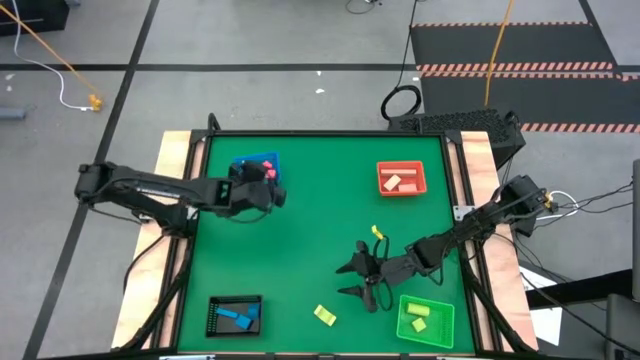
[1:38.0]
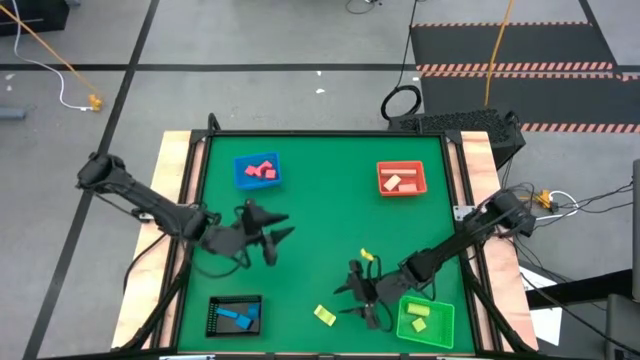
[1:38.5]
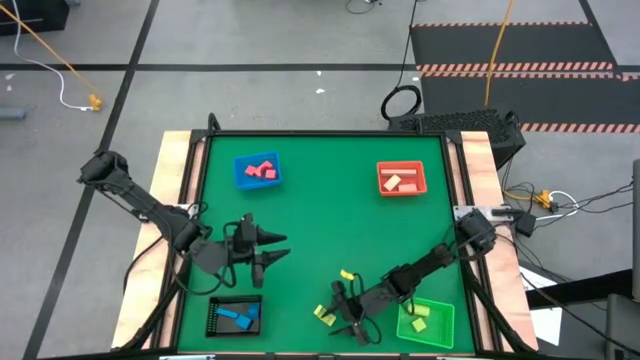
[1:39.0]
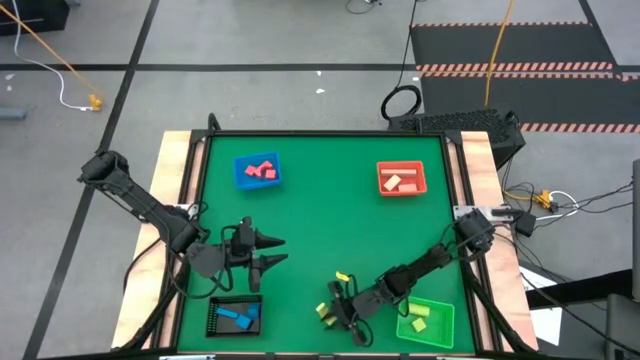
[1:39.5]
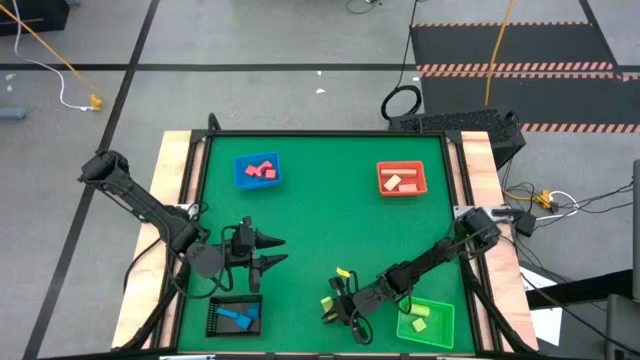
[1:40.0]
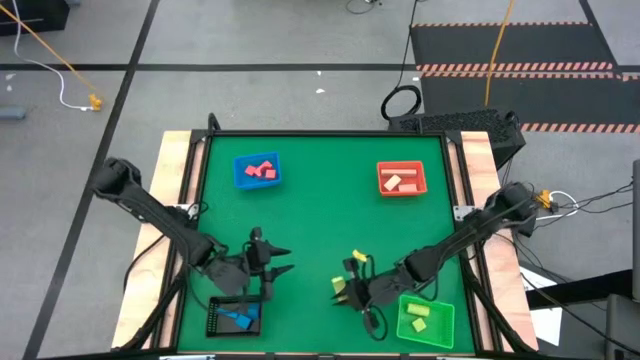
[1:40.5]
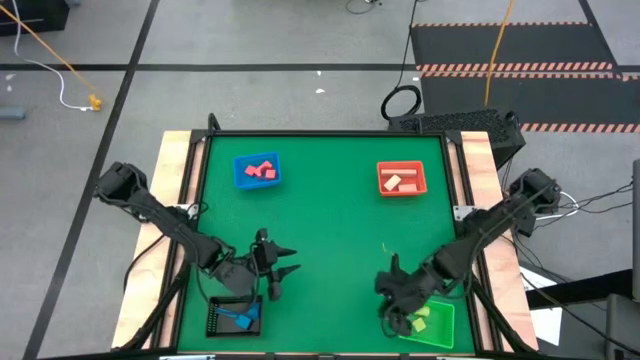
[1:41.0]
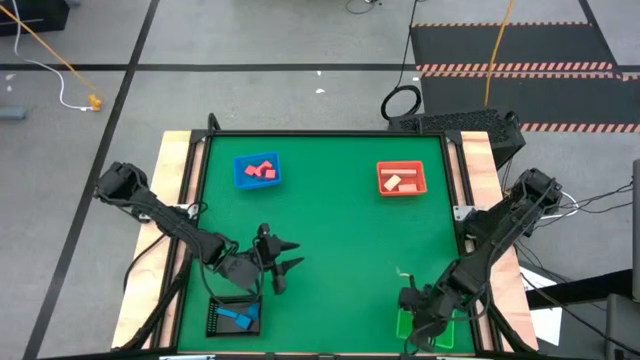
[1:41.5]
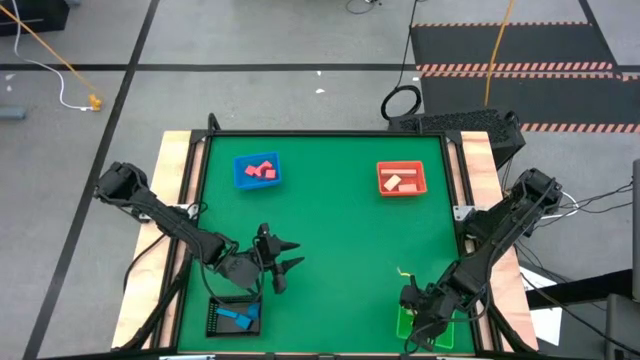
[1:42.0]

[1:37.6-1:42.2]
Task: Sort & place blocks by color
Put the green block in the green basket

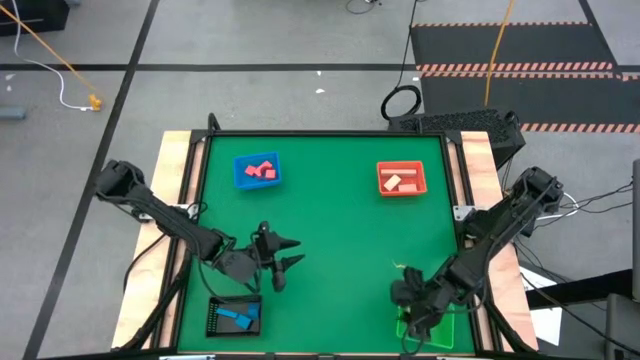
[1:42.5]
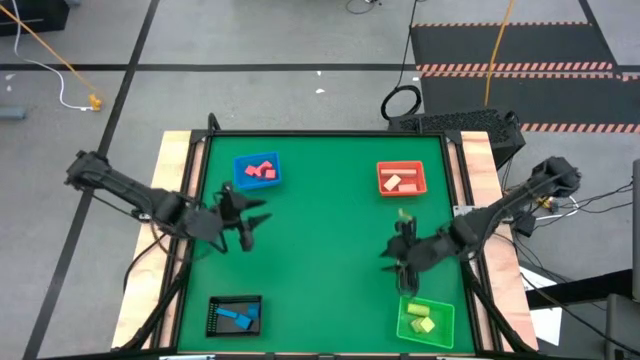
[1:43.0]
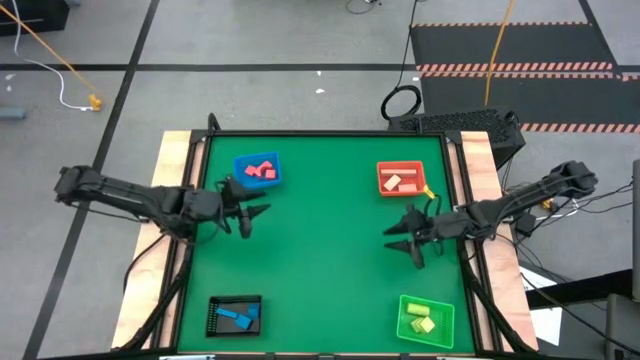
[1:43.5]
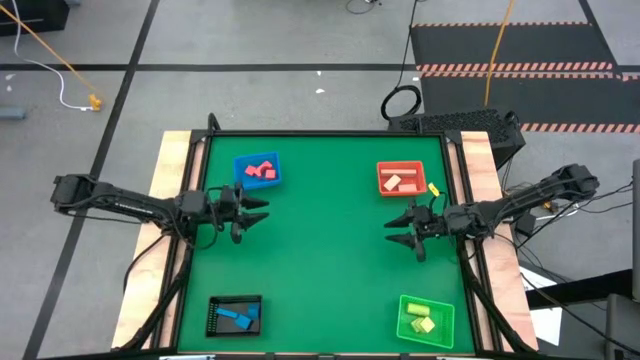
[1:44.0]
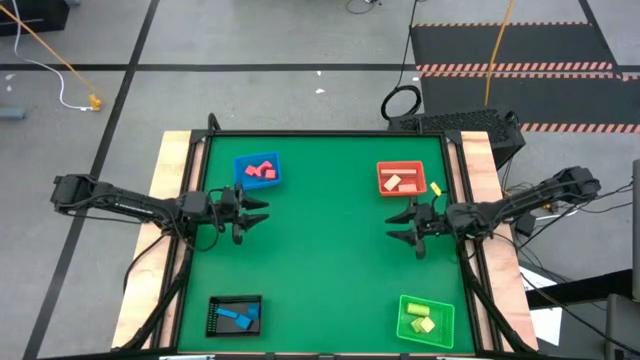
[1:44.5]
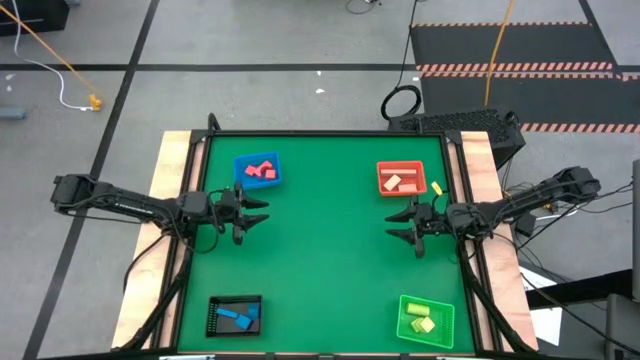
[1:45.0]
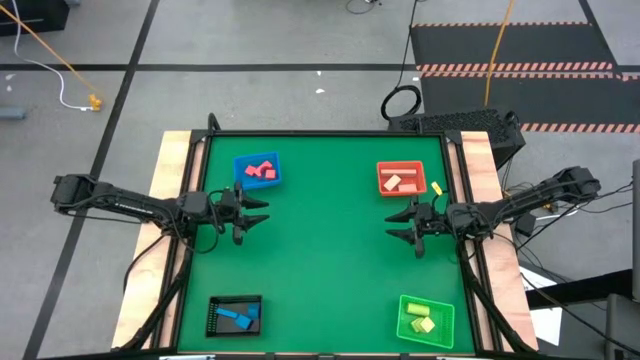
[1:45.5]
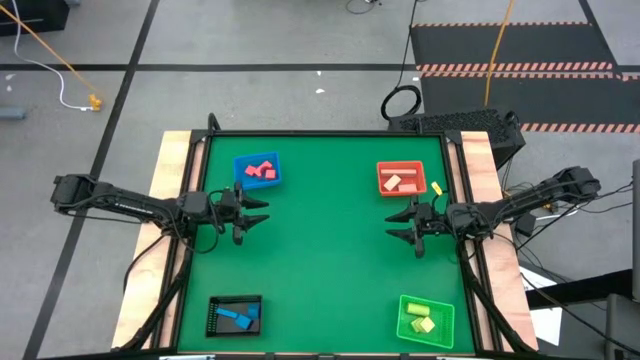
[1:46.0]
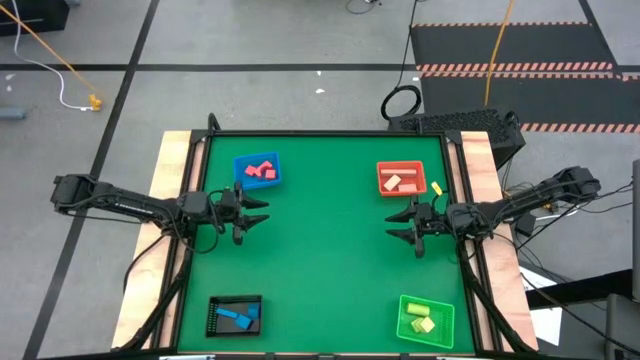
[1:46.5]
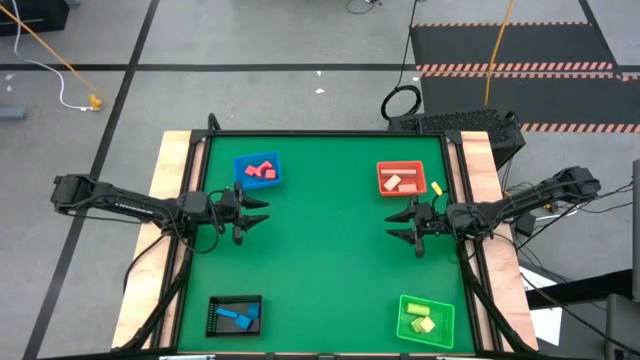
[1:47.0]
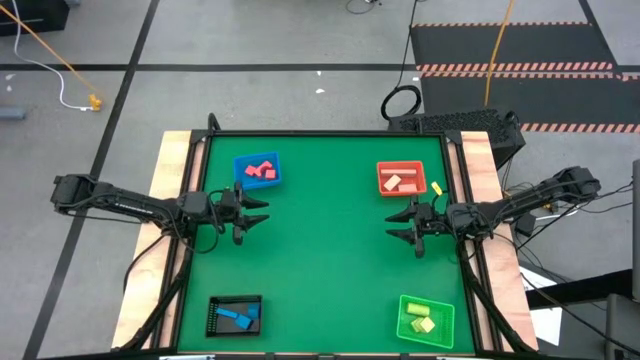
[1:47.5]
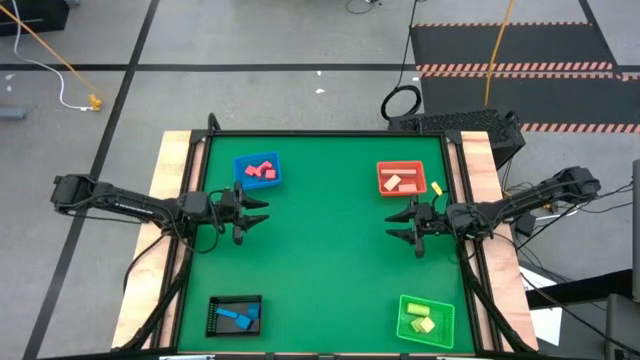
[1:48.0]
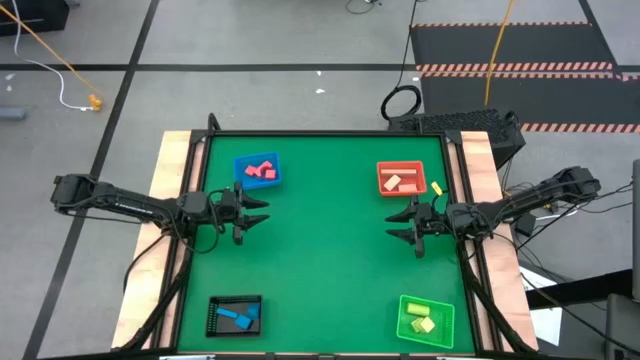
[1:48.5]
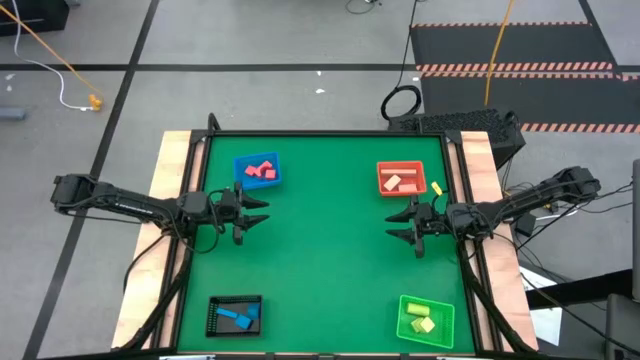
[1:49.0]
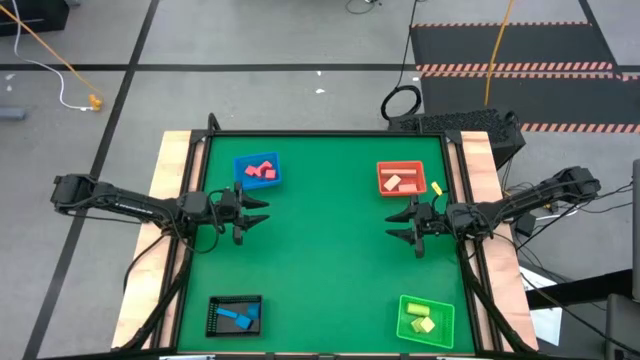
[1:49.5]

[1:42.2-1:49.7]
Return to Home Position

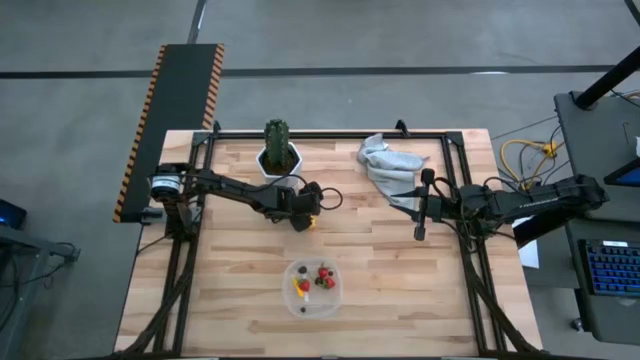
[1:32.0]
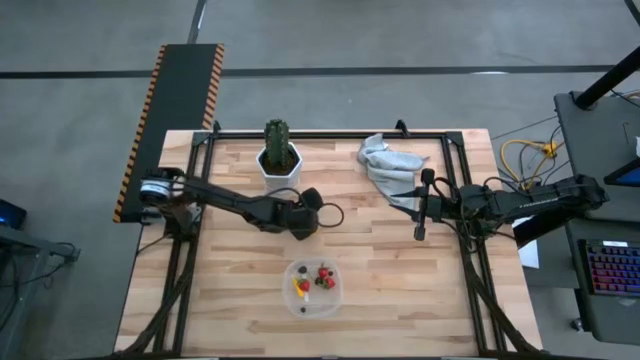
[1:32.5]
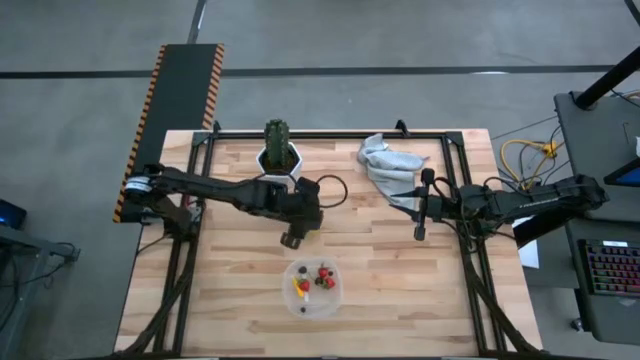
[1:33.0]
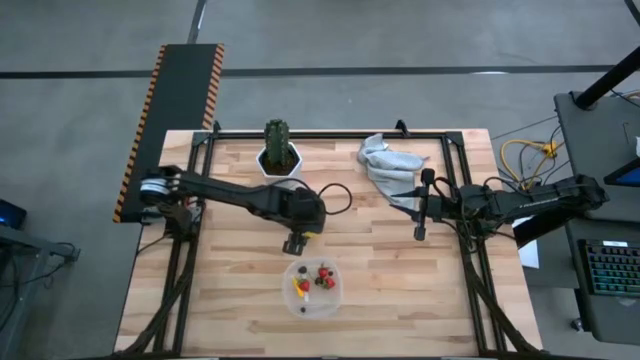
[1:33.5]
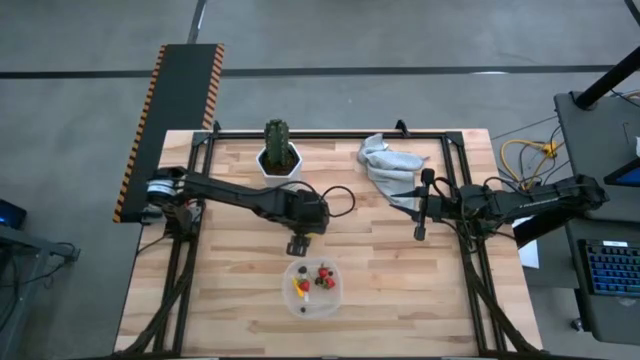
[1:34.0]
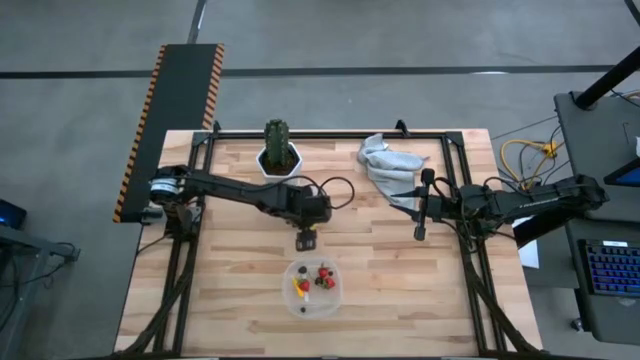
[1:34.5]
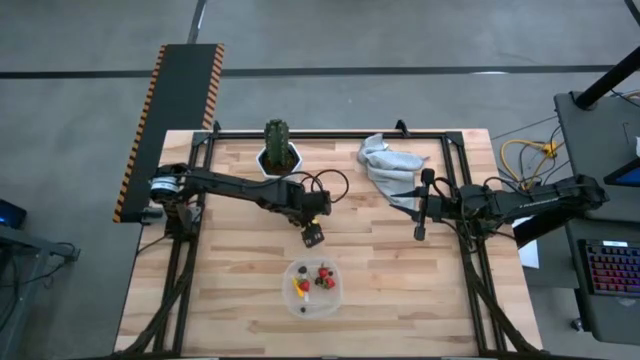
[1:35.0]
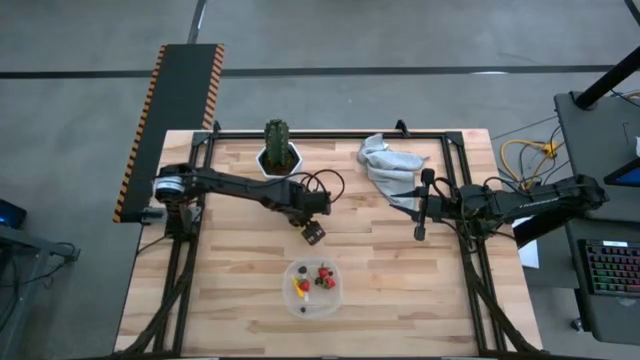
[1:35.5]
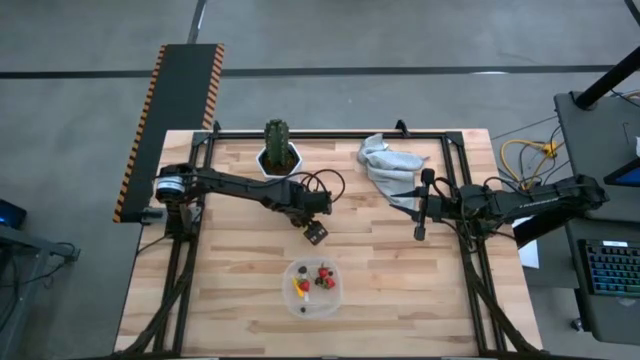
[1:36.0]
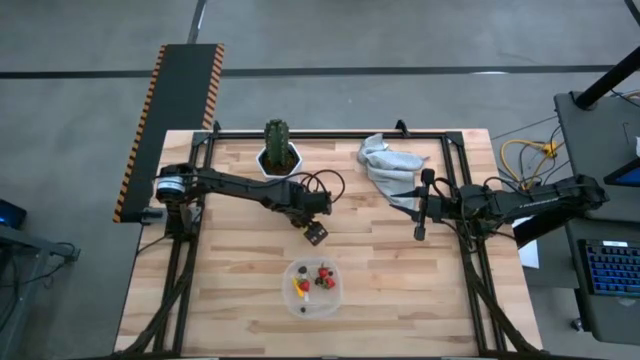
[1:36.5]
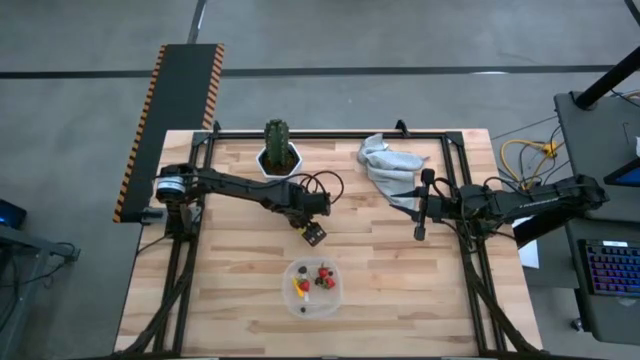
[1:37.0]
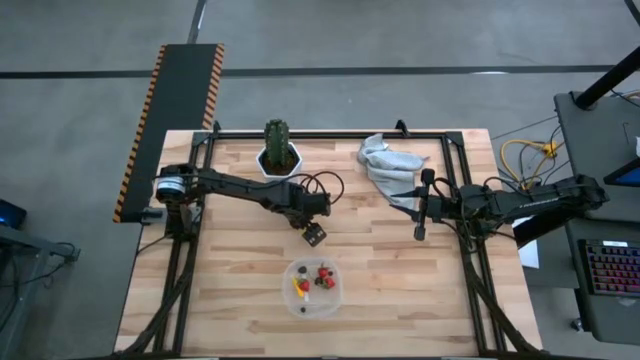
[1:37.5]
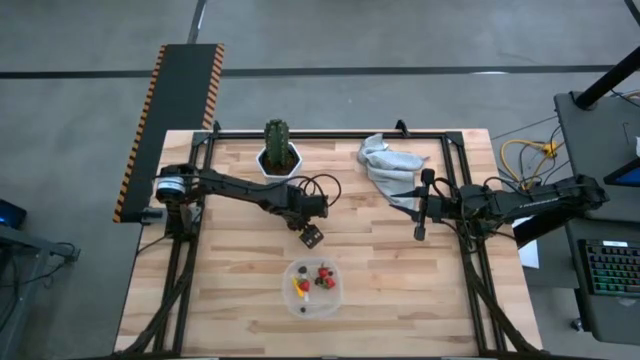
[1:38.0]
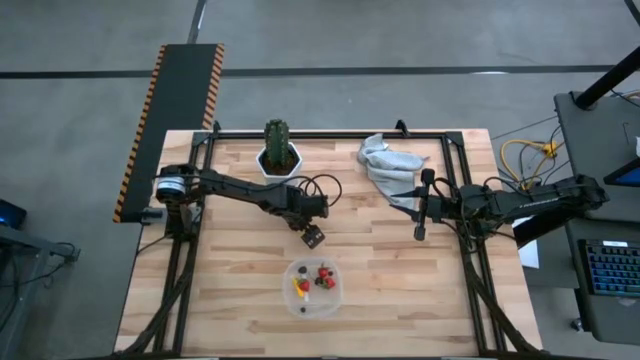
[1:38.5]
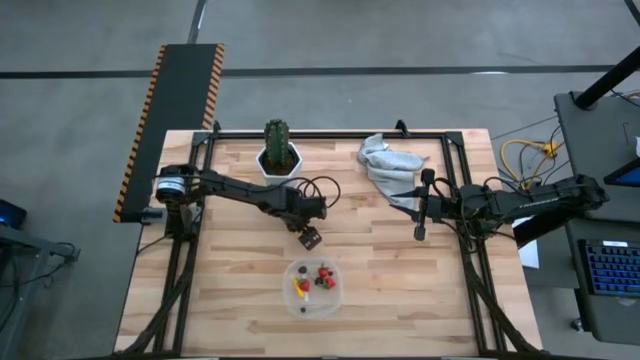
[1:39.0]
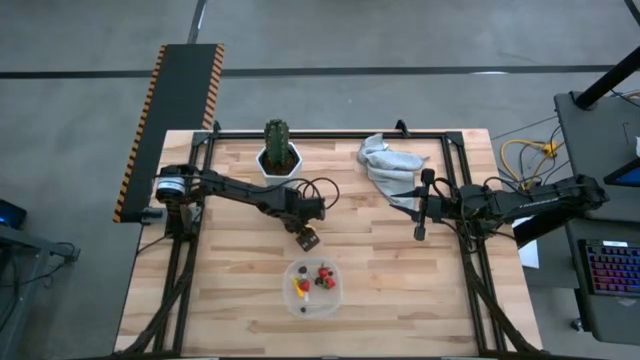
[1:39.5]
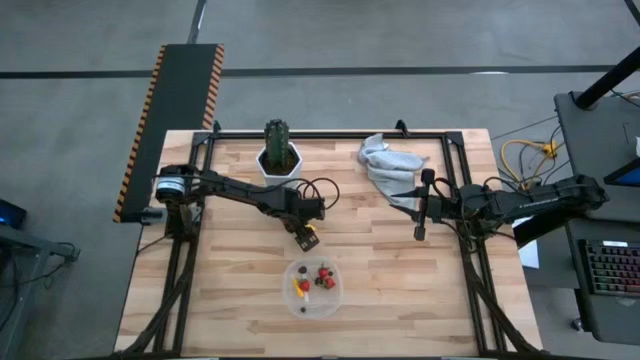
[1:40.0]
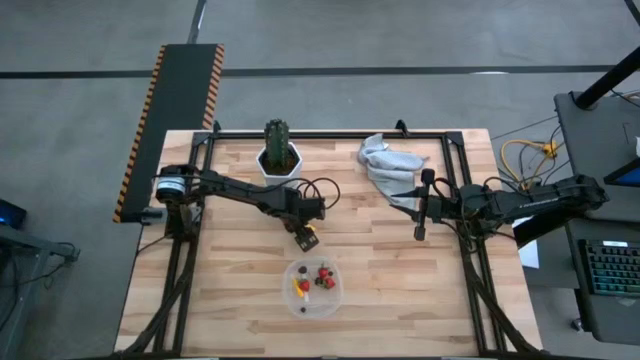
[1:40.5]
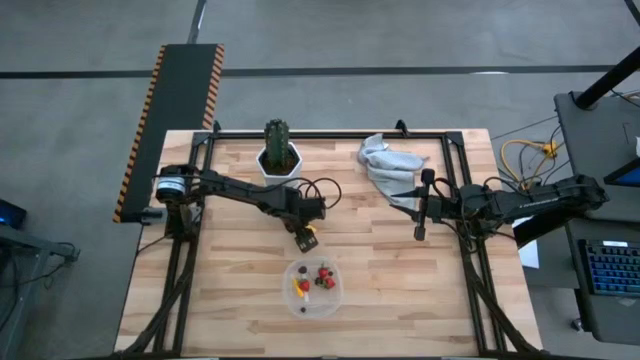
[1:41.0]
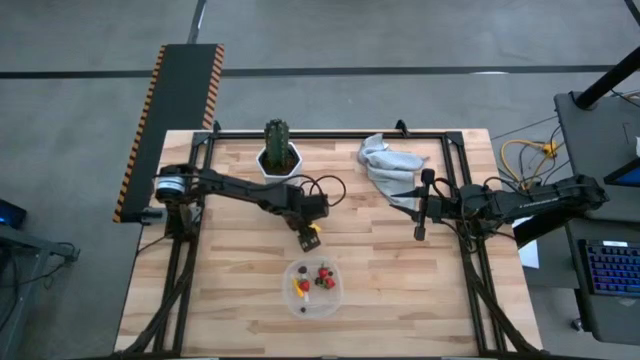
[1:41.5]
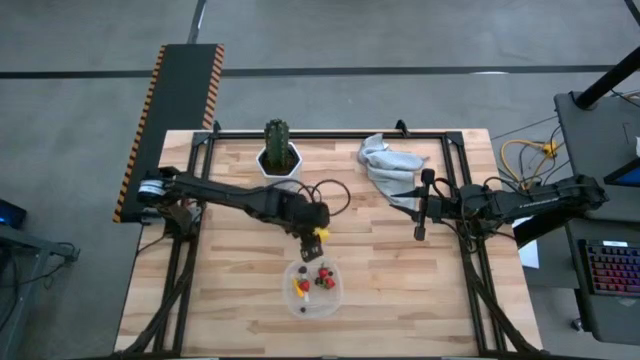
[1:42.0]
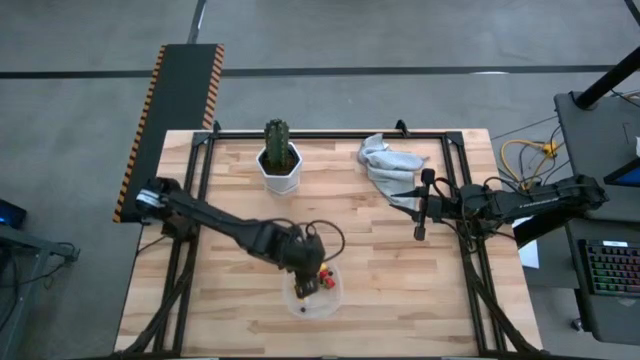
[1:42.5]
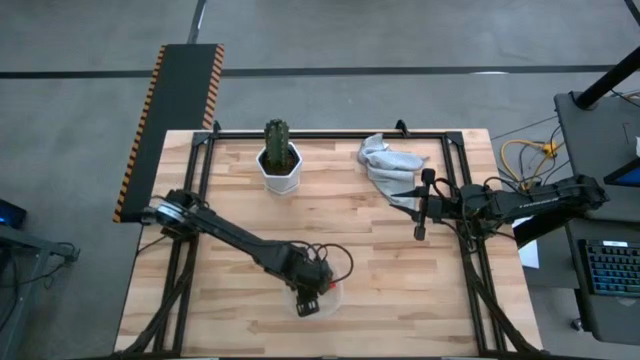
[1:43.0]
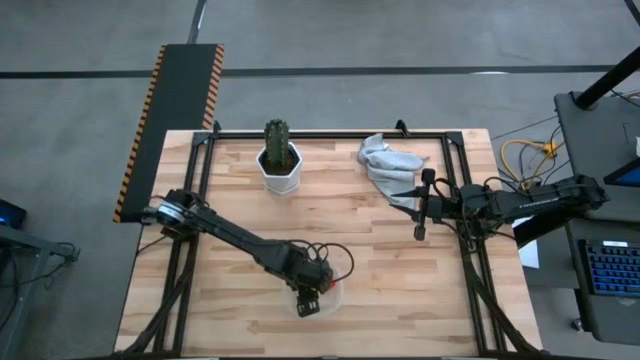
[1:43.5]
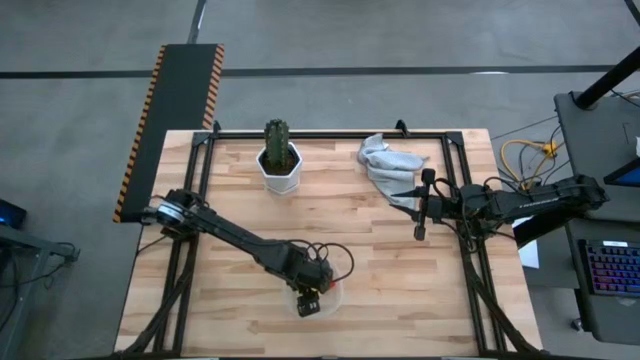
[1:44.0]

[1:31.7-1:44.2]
Task: Pick and placing Produce into tupperware
Put the yellow lemon into the transparent container
